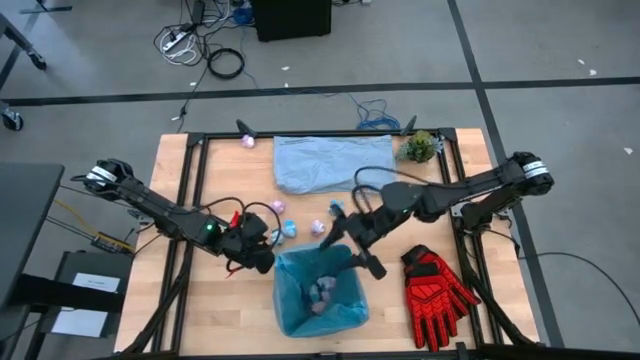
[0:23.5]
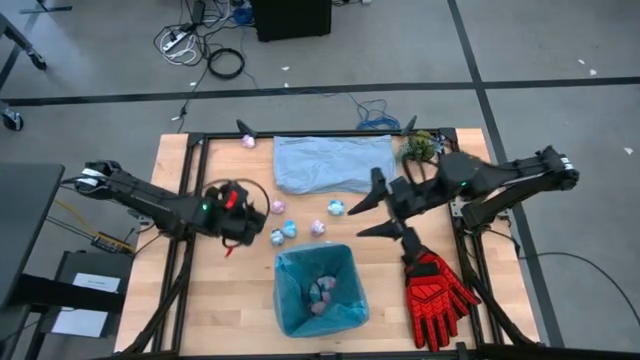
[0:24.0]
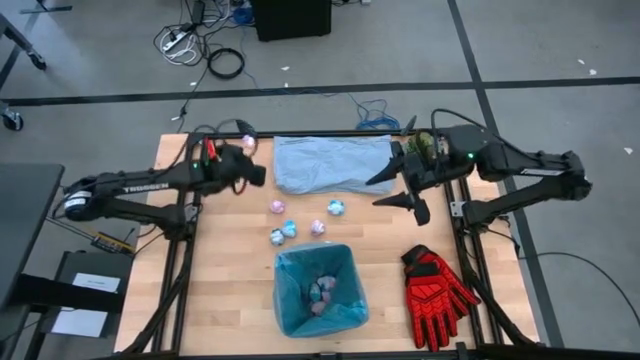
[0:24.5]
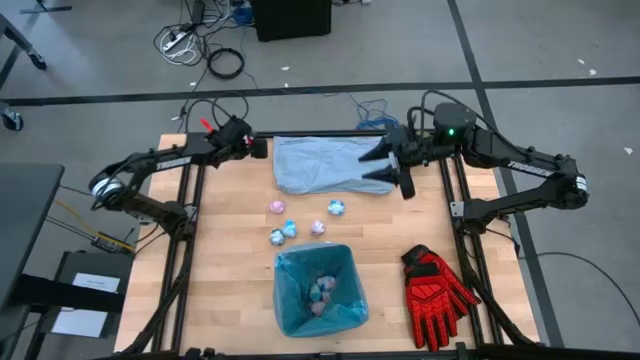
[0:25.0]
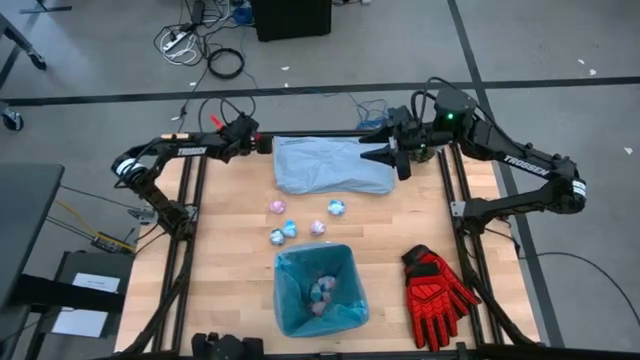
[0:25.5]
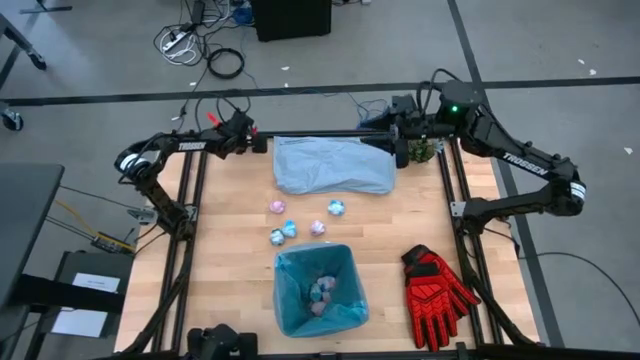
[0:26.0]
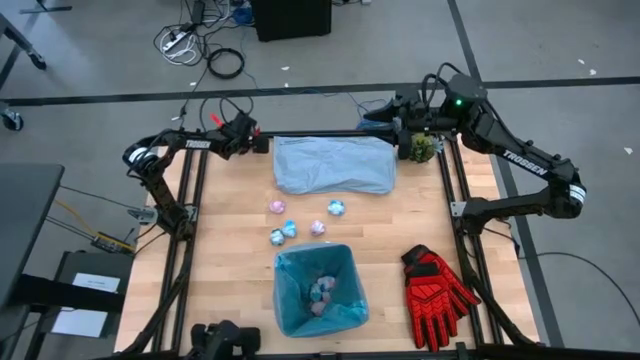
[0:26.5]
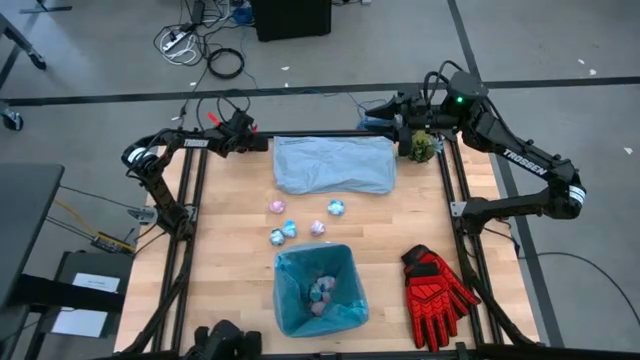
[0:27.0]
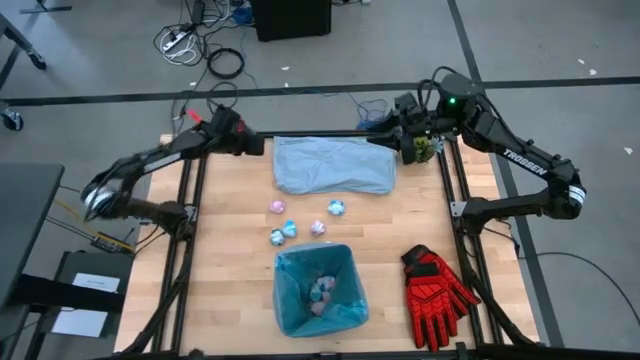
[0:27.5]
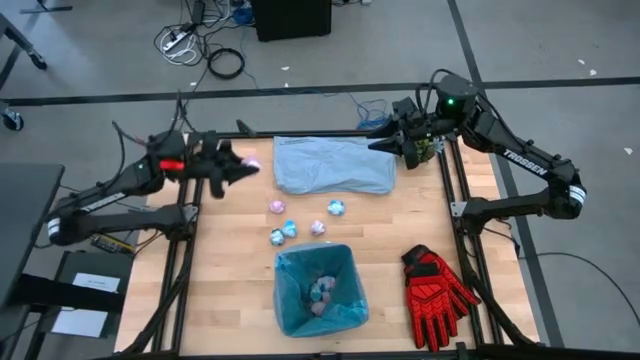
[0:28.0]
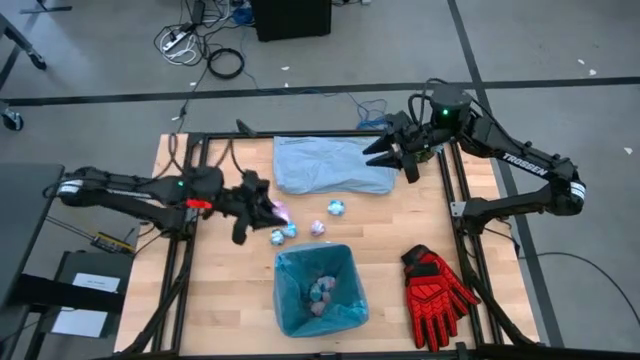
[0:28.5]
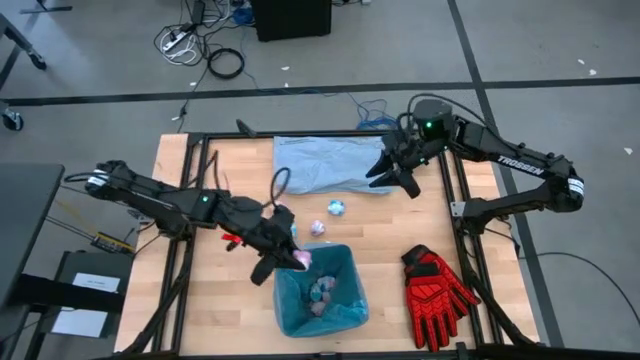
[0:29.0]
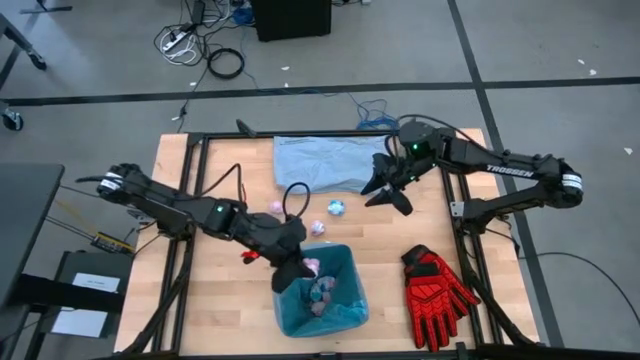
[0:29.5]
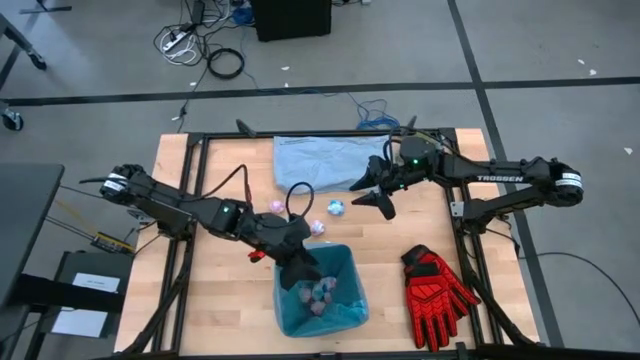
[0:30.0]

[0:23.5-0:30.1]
Task: place trash/remove bag and relplace
Put the pink crumbled trash bag into the trash bin

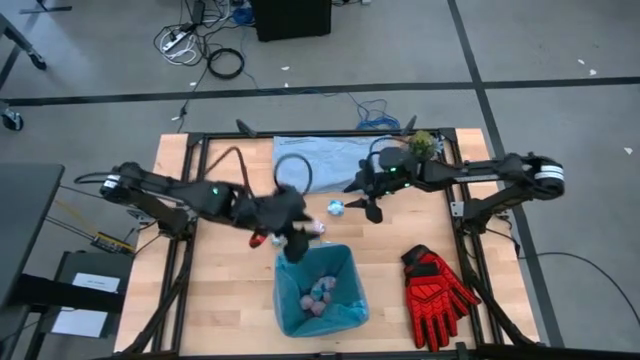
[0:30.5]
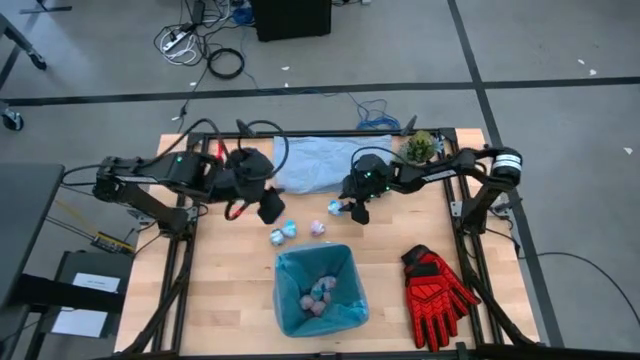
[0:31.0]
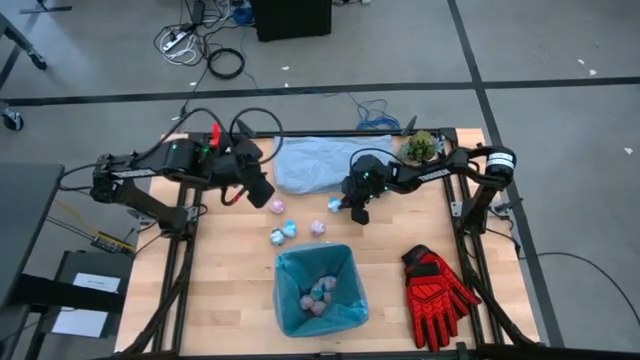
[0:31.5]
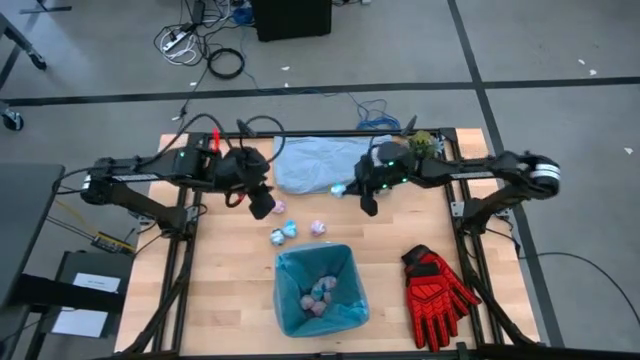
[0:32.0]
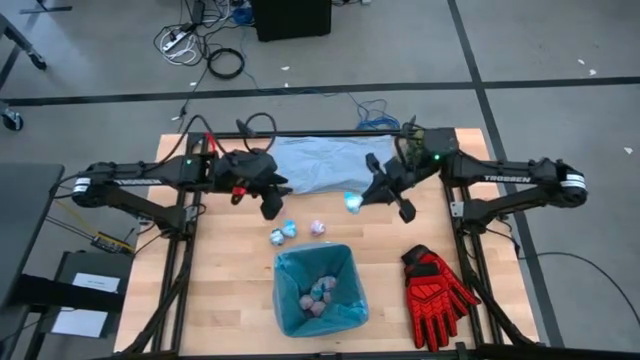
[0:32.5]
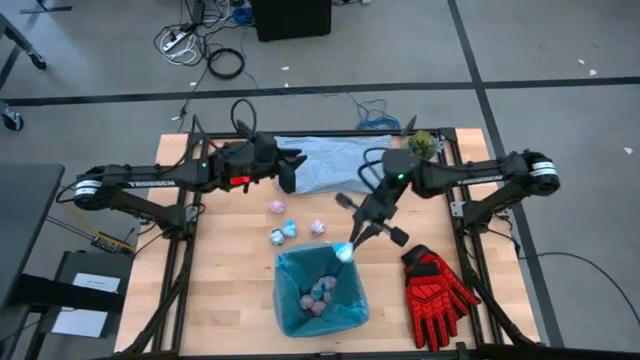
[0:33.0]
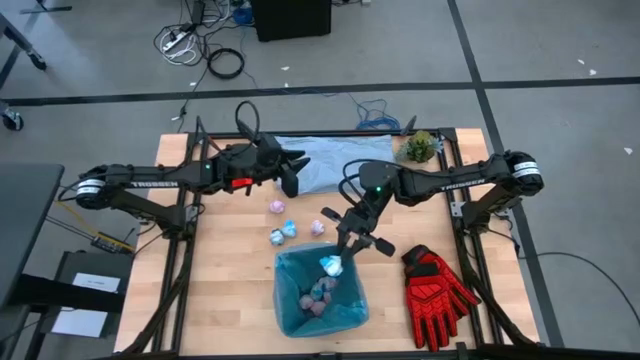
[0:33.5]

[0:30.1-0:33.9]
Put the blue crumbled trash bag into the trash bin

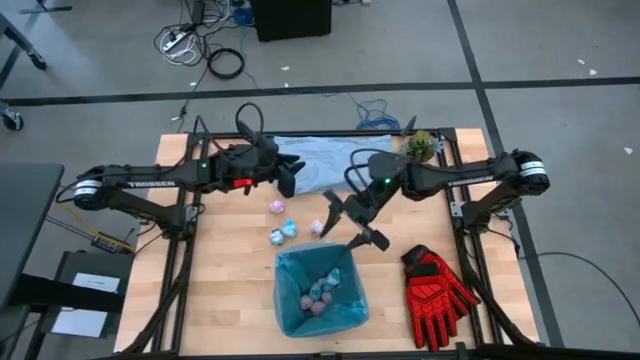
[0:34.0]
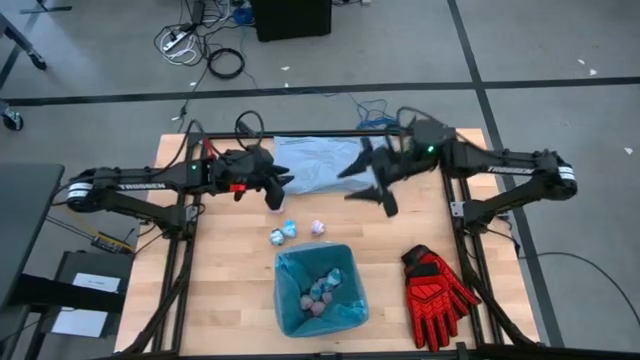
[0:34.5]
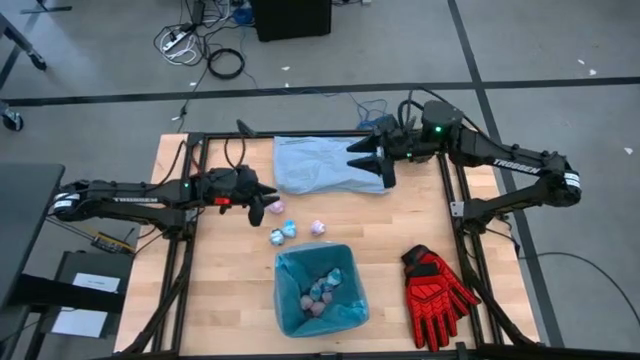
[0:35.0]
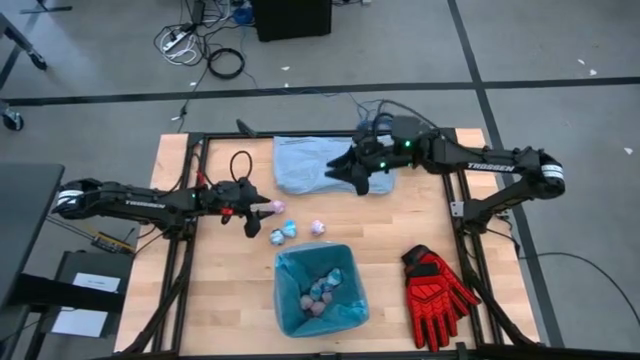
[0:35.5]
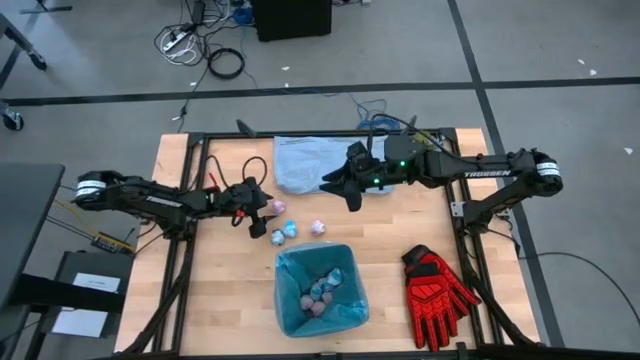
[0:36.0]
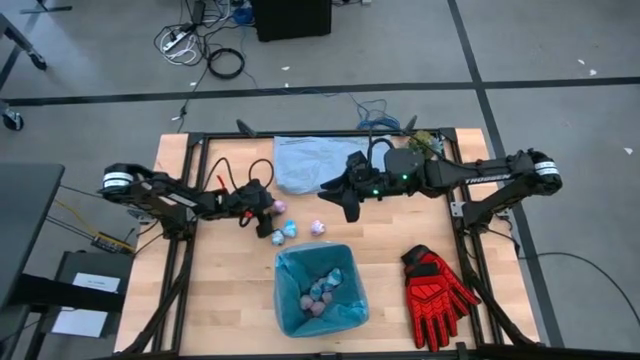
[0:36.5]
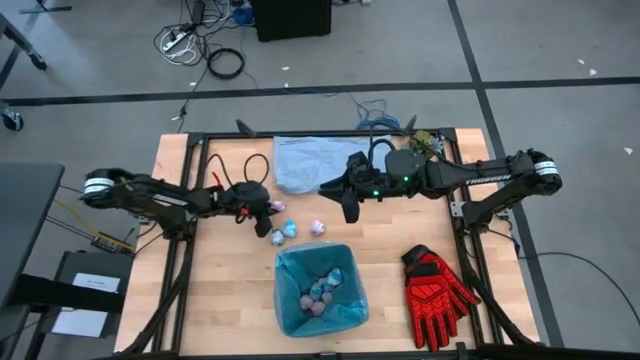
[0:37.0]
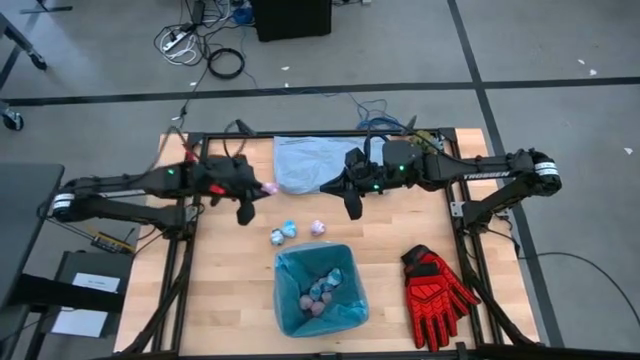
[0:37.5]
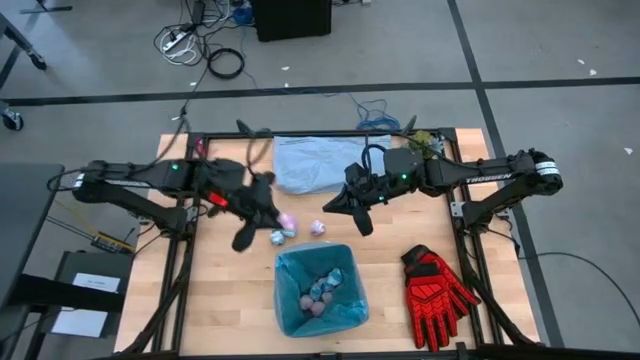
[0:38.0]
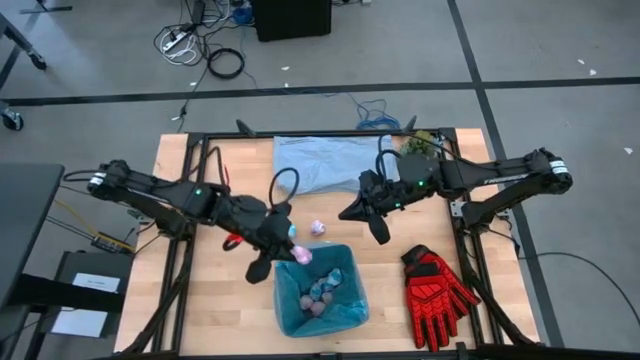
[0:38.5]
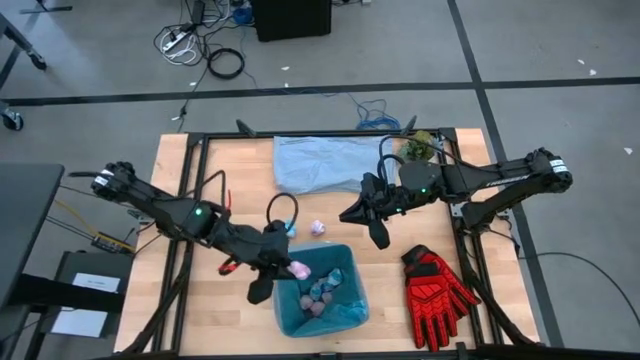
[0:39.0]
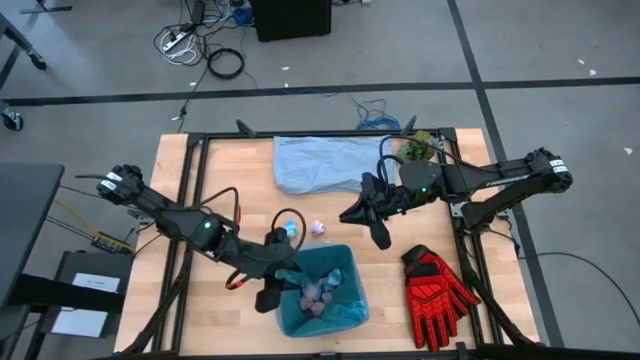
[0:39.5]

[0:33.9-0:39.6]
Put the pink crumbled trash bag into the trash bin

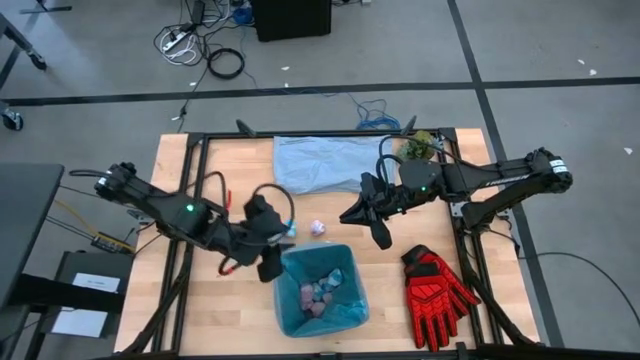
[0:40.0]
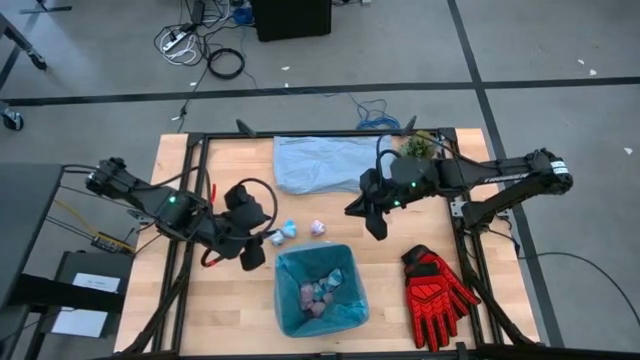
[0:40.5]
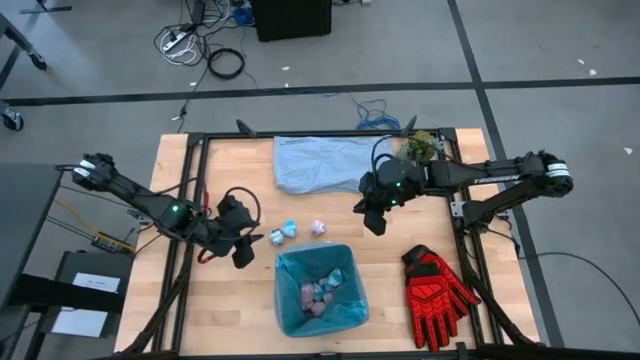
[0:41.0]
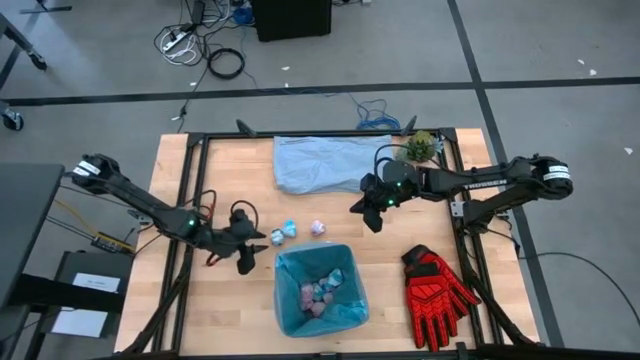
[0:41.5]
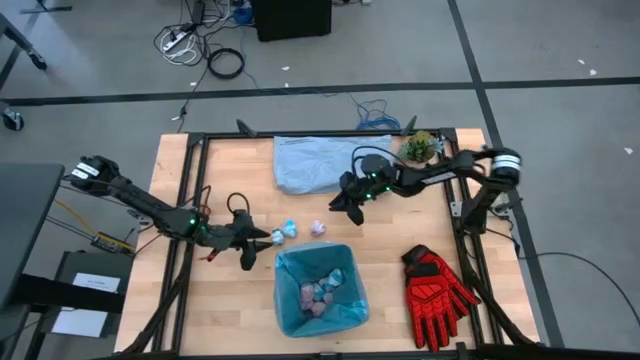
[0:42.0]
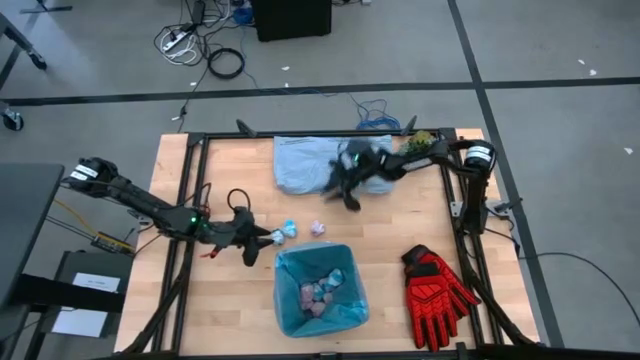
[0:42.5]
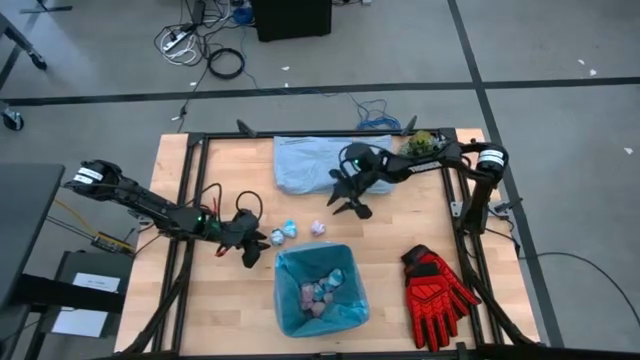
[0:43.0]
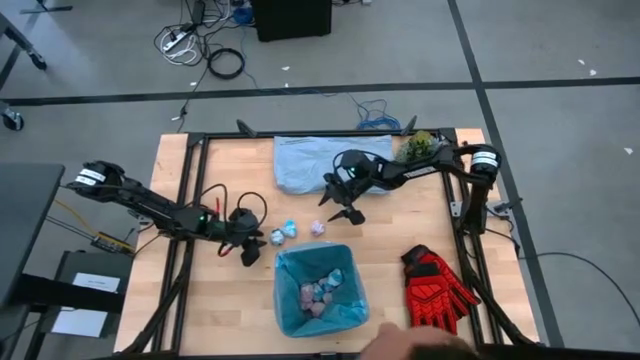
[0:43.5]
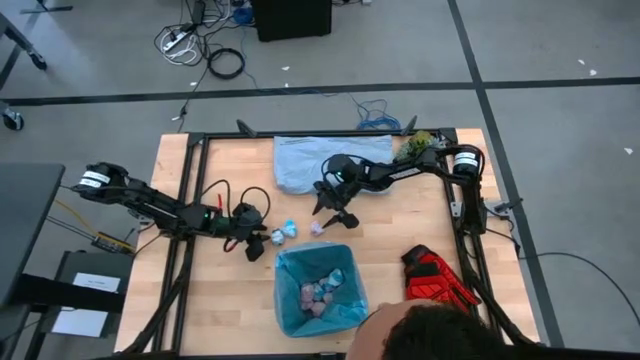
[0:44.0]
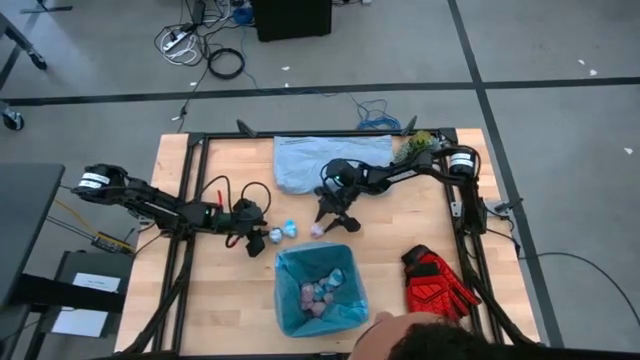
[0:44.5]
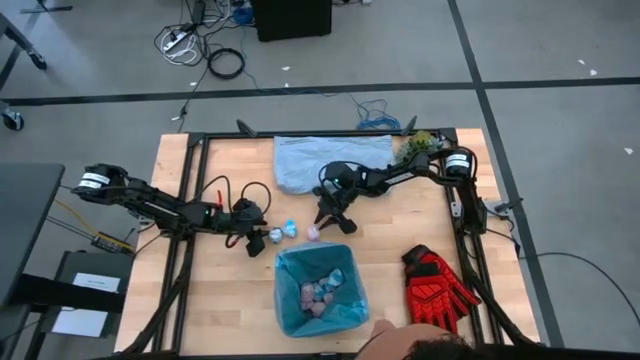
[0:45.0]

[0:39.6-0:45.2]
Put the pink crumbled trash bag into the trash bin
